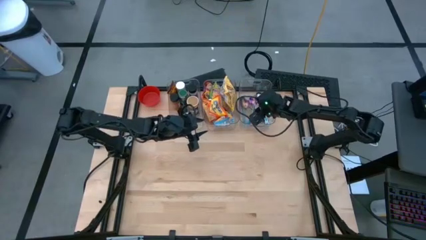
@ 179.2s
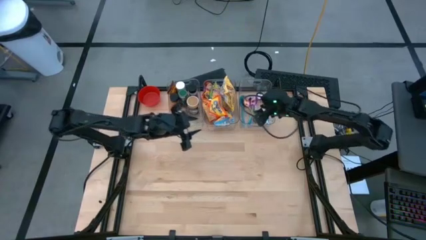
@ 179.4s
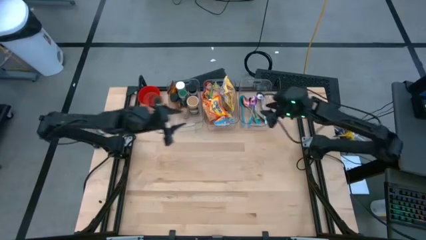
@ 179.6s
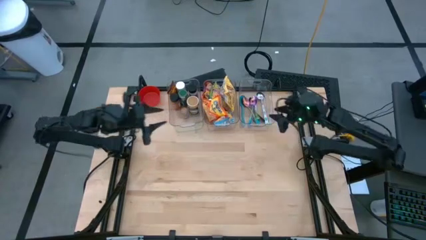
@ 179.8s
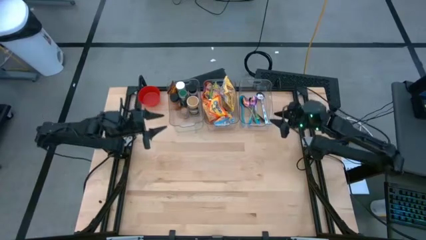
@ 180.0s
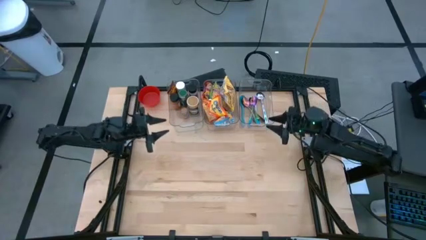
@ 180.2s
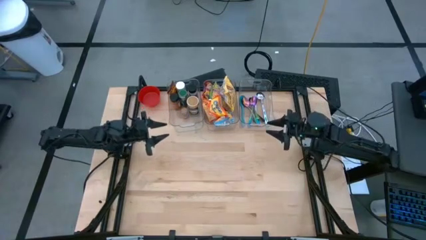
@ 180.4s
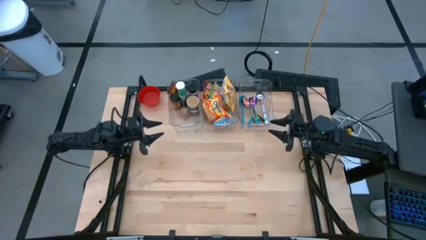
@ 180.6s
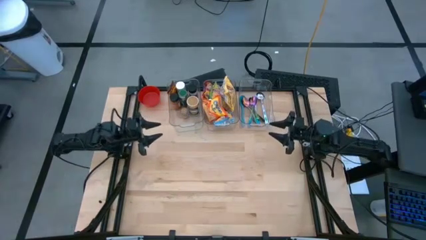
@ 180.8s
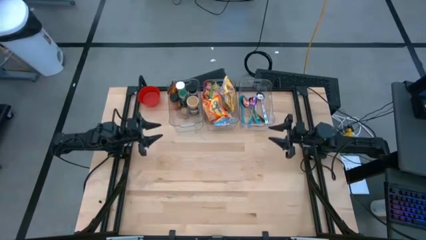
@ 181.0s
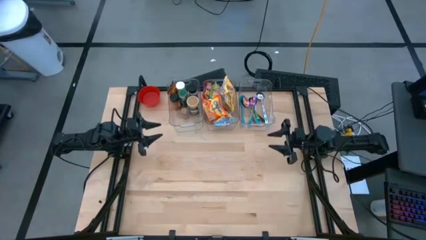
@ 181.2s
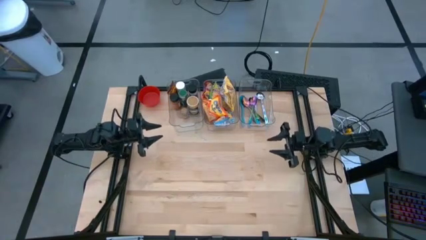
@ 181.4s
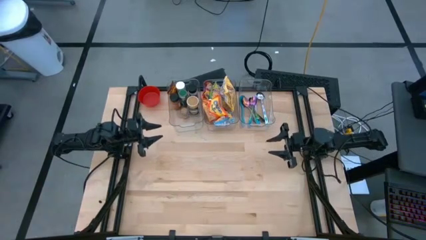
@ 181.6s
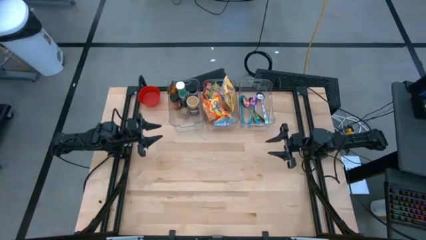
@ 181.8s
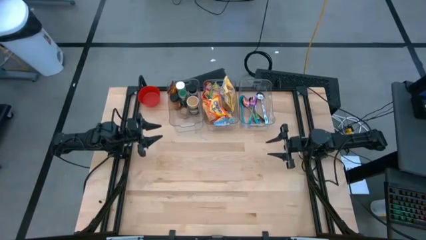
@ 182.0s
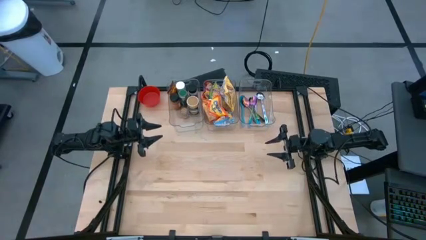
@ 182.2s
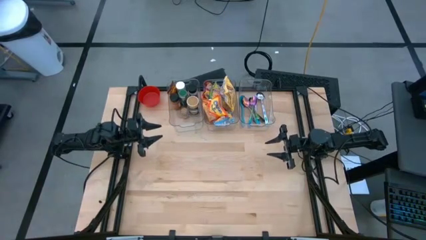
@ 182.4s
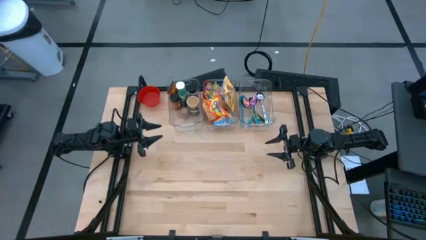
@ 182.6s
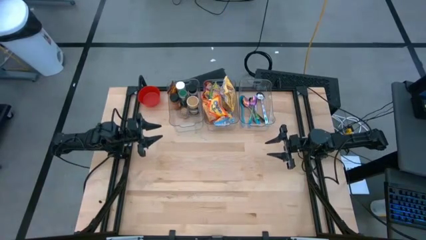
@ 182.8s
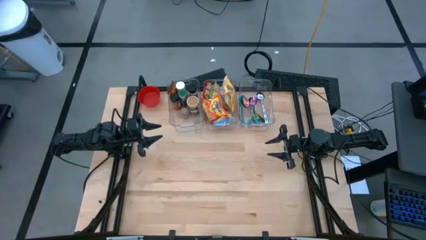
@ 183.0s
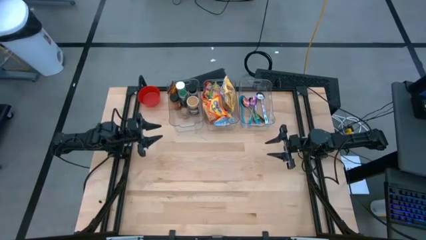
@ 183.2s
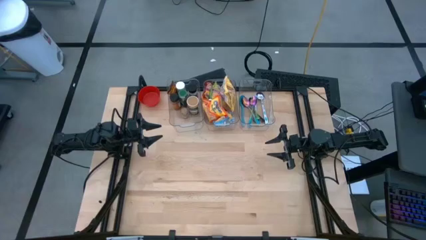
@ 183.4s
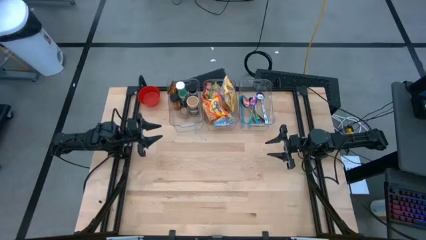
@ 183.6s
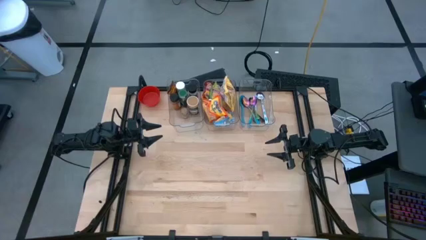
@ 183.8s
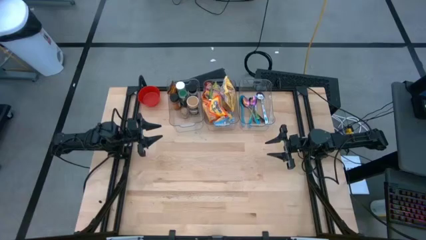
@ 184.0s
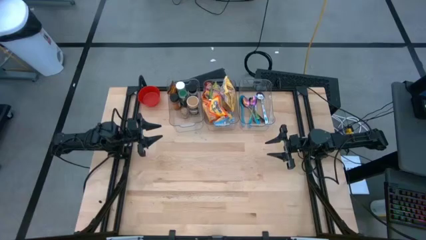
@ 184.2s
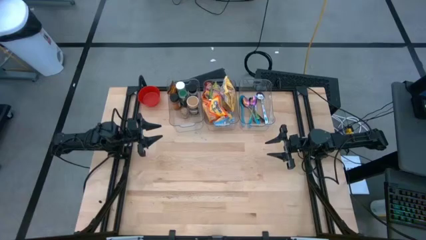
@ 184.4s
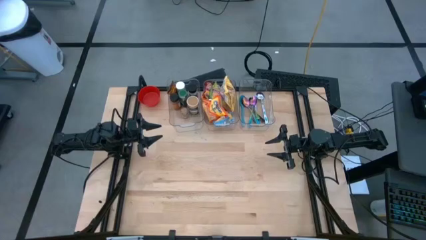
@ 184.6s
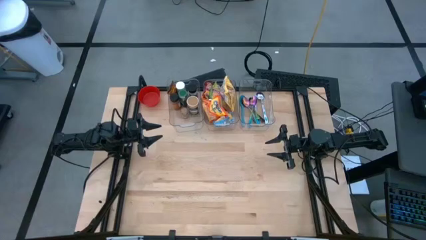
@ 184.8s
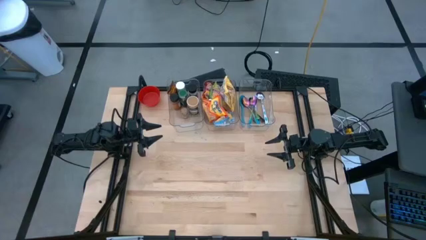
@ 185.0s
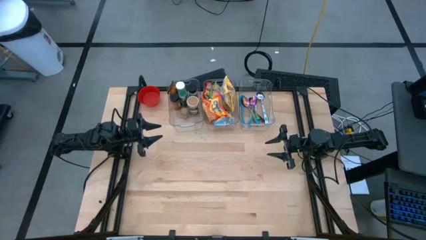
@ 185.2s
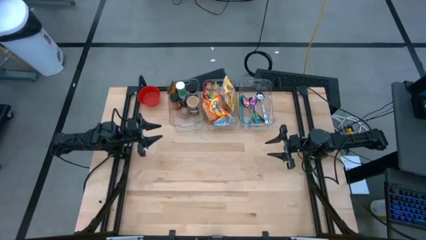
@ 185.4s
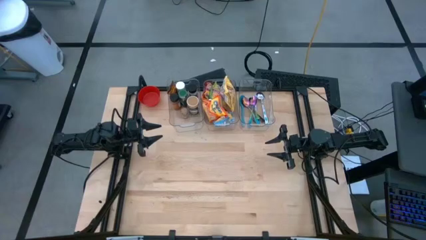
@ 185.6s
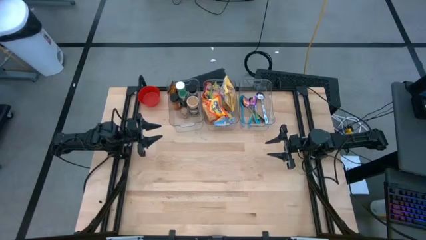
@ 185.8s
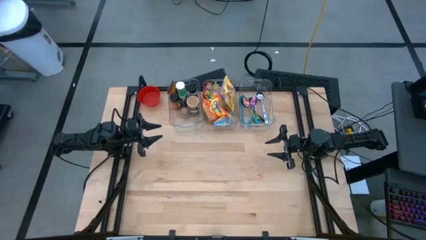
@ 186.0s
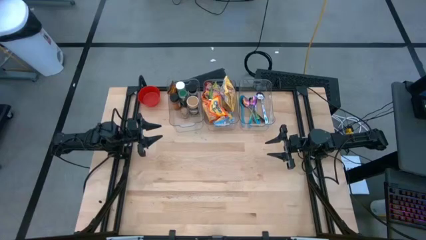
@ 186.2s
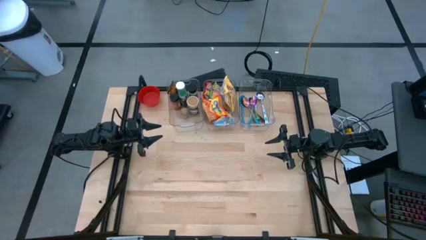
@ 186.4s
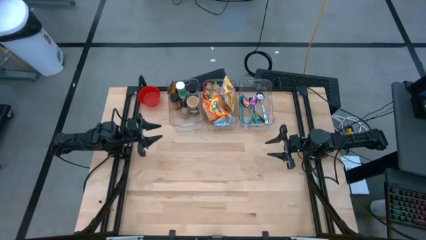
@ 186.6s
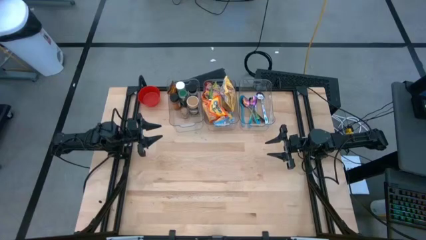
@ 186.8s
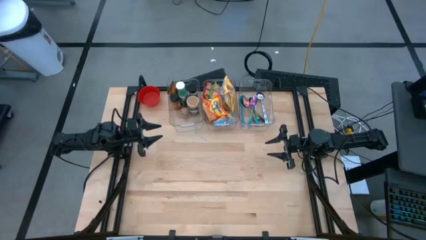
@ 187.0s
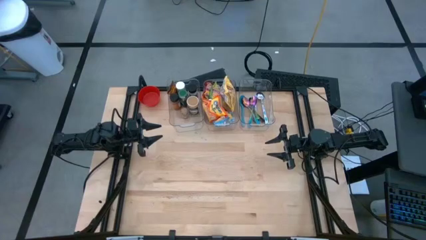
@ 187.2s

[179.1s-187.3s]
Task: Pick & Place Food Item
Return to Home Position

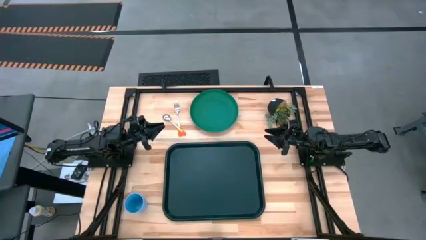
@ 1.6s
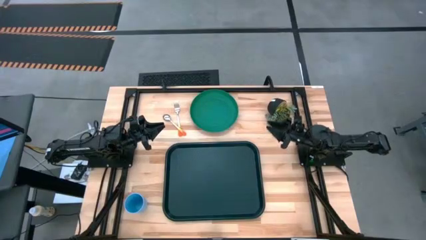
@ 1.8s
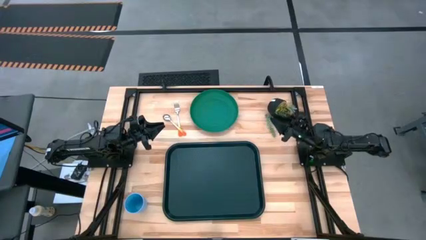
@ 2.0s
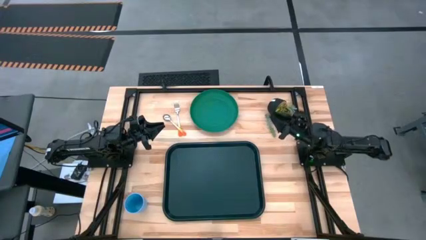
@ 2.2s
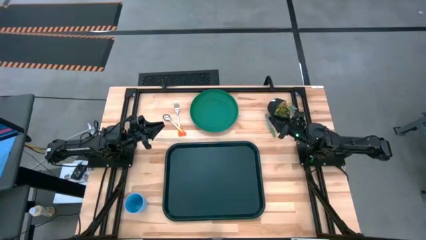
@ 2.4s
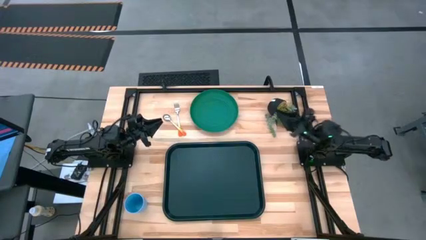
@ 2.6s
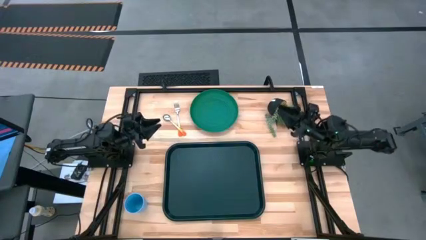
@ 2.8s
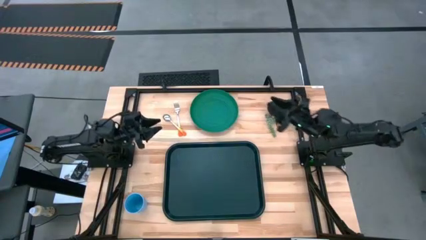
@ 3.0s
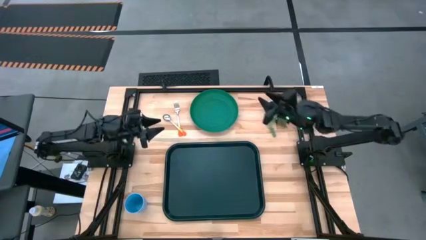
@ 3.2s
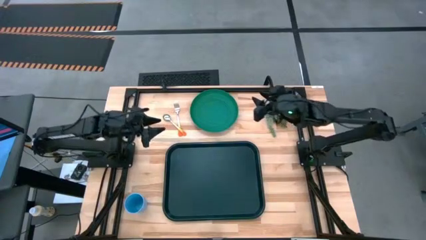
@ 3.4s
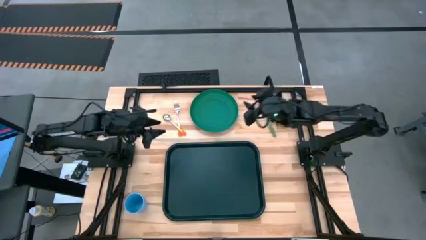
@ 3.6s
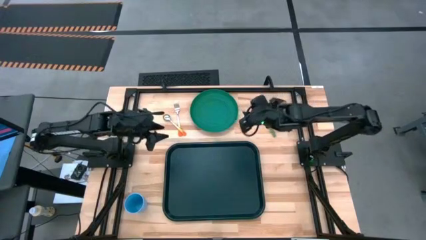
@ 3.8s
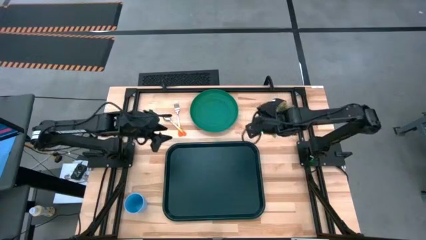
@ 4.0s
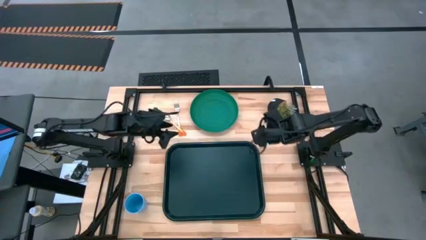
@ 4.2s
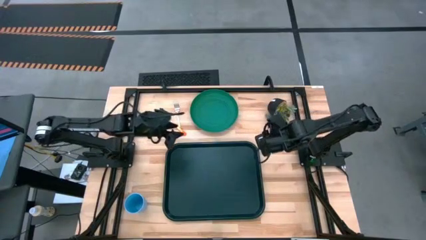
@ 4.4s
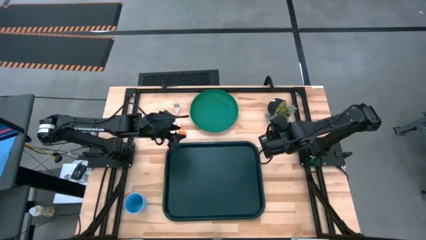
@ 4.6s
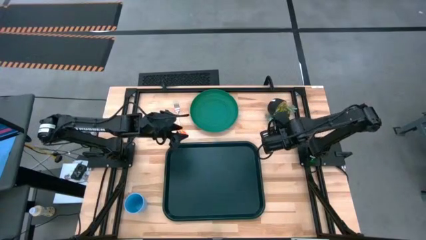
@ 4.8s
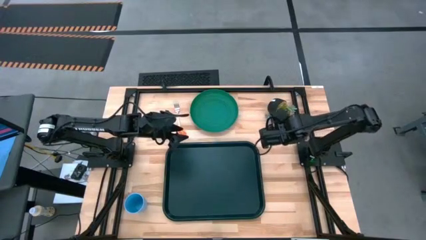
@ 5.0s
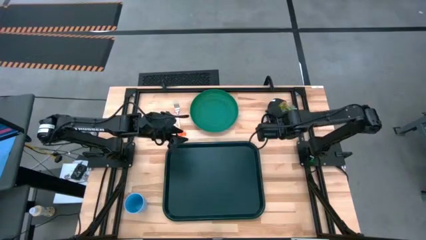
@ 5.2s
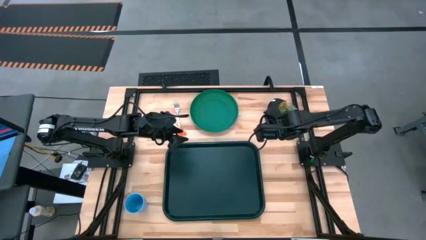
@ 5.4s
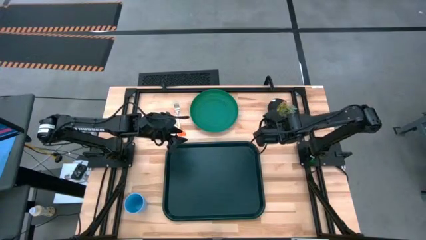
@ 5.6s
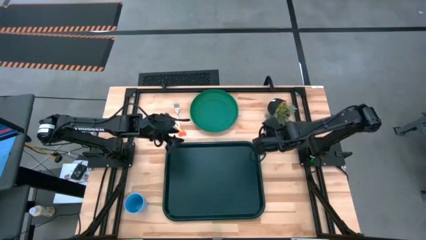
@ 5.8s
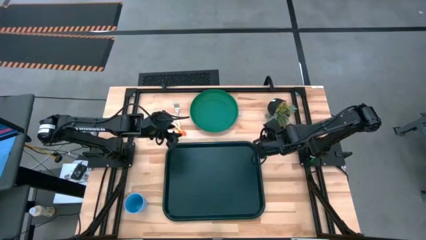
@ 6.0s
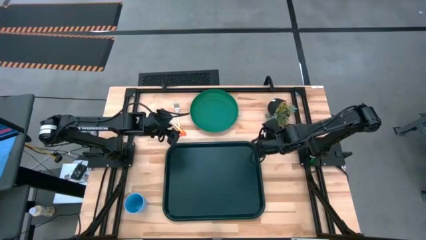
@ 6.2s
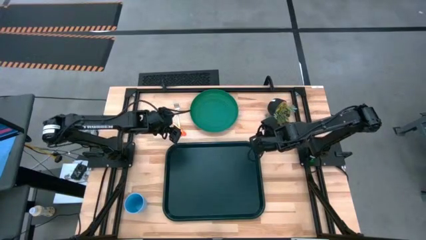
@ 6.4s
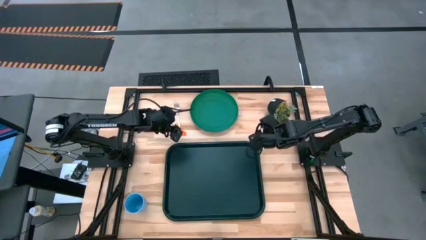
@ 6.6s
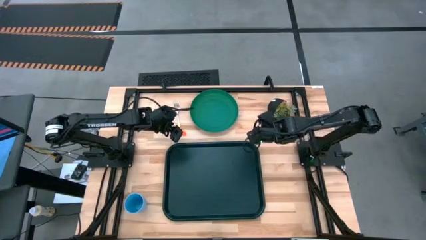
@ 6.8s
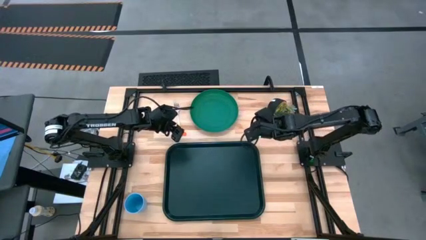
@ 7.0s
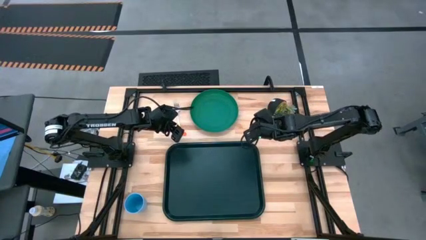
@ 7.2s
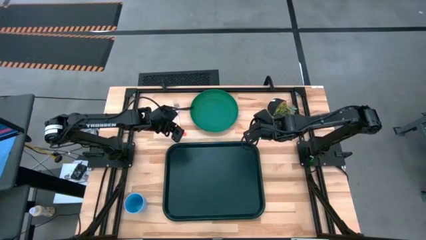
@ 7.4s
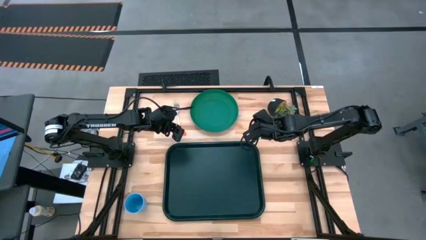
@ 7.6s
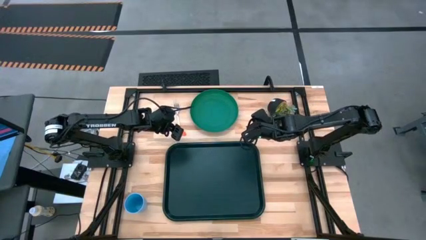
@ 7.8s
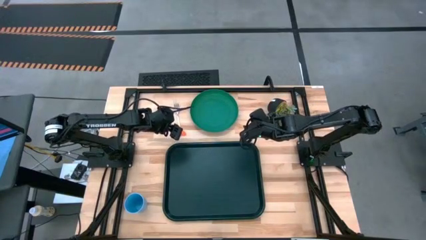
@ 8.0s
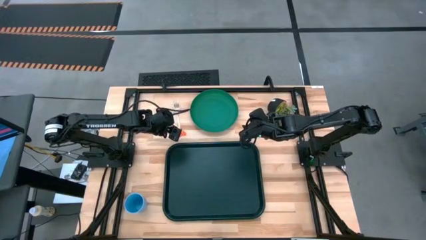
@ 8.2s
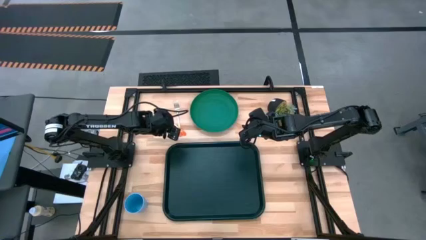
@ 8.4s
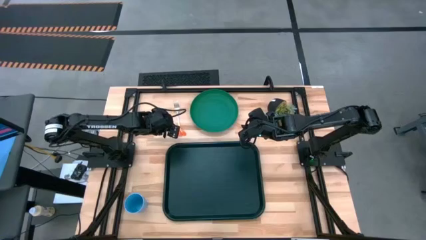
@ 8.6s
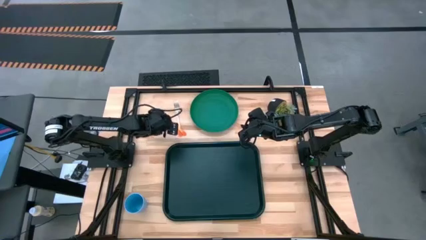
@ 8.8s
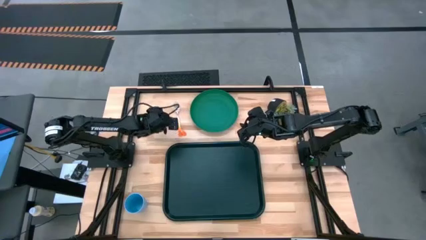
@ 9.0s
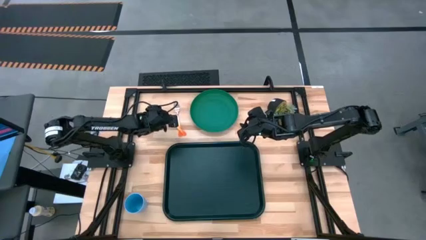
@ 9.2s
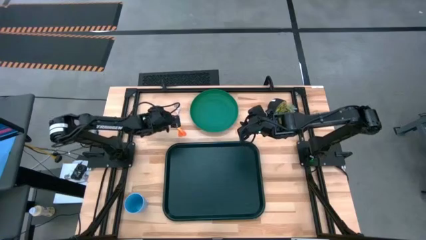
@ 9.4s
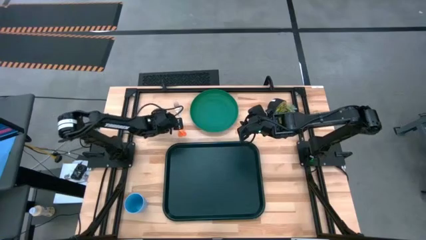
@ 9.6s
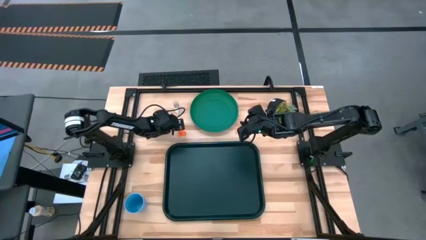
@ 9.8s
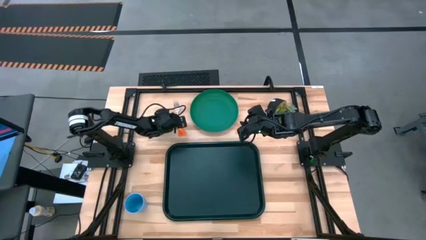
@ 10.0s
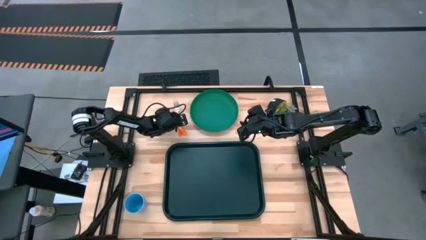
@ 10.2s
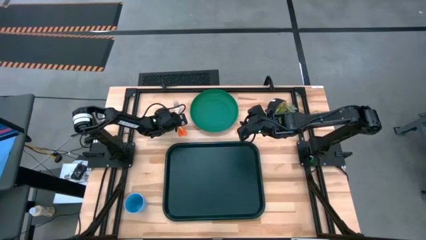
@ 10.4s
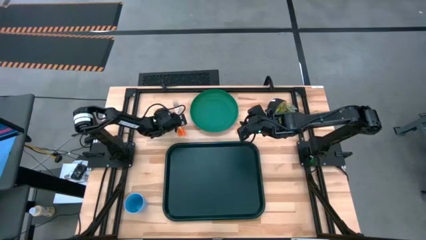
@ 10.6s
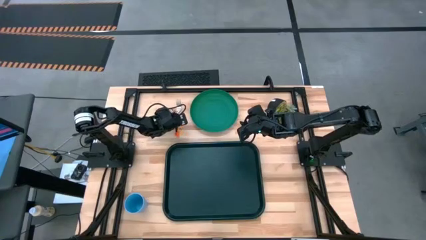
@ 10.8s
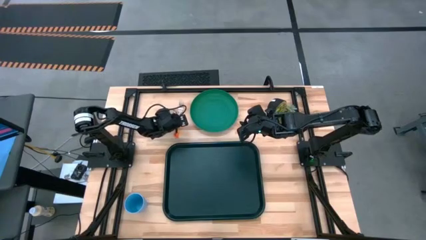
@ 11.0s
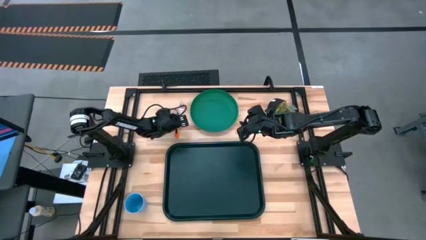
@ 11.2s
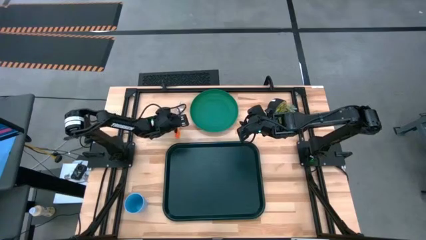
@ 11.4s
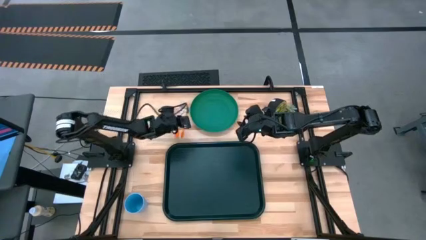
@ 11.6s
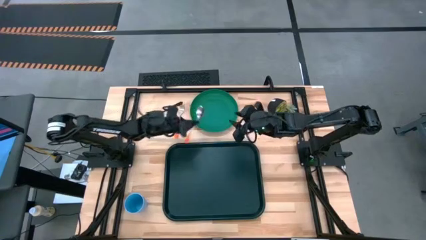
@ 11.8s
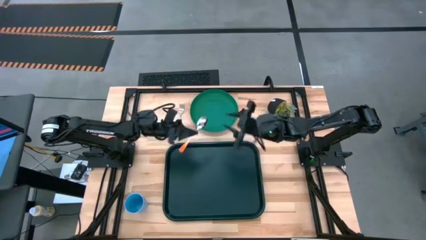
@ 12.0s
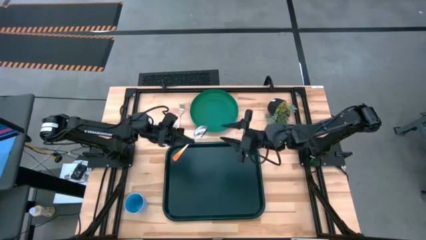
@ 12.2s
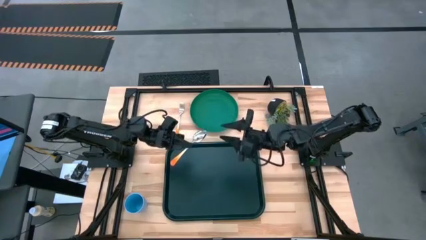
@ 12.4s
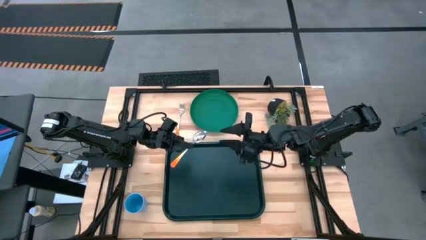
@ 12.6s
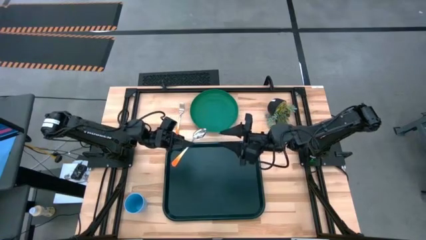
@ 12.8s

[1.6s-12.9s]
Task: Pick and place plate/cup/fork/spoon on tray
Put the orange spoon on the black tray to the left
